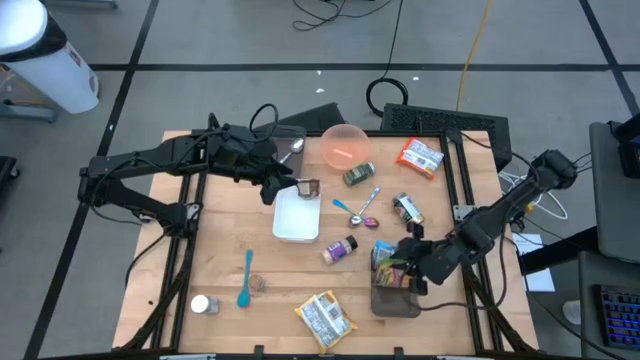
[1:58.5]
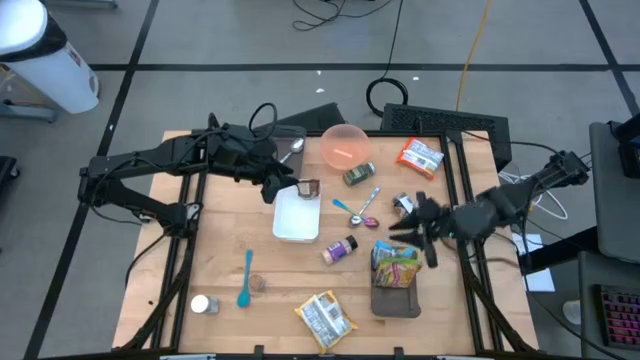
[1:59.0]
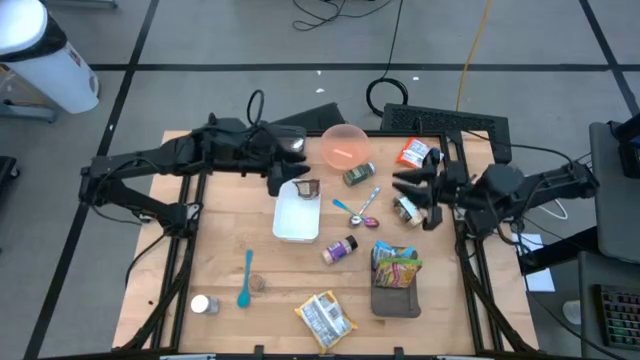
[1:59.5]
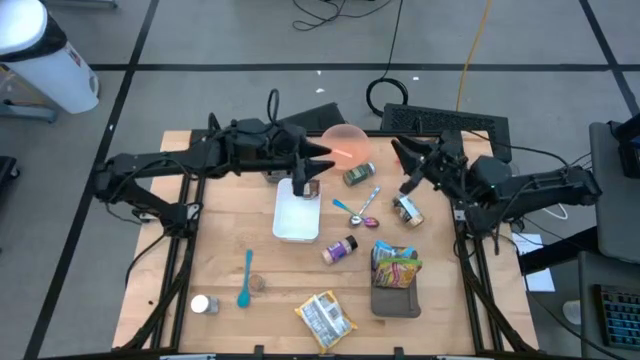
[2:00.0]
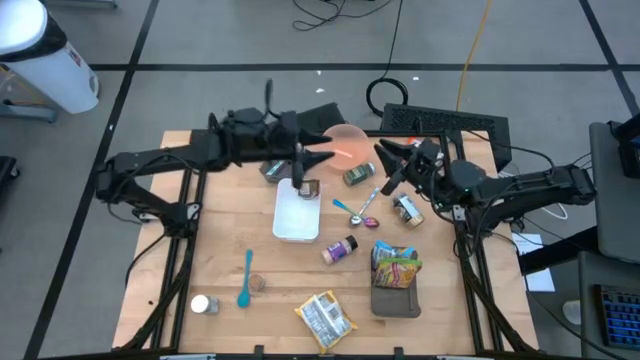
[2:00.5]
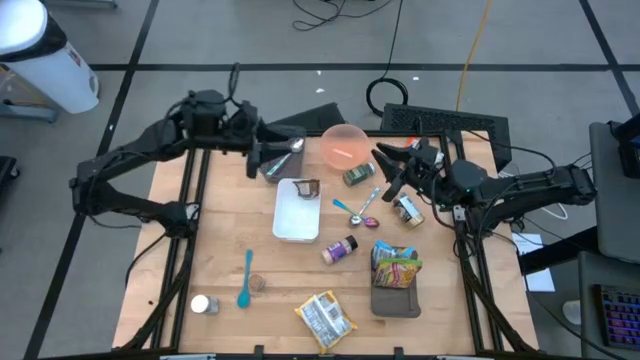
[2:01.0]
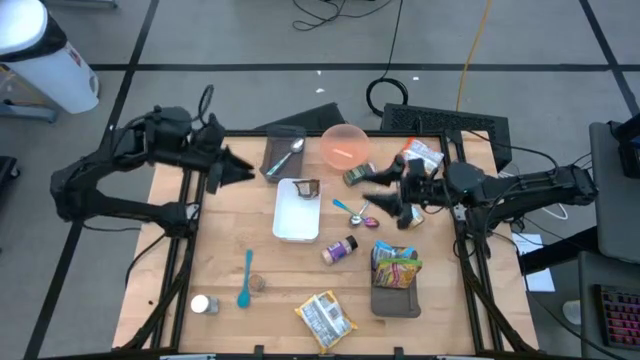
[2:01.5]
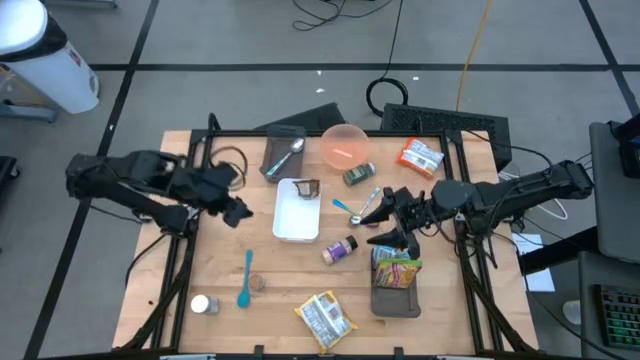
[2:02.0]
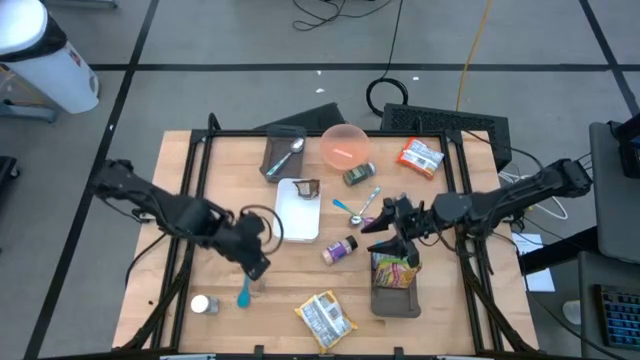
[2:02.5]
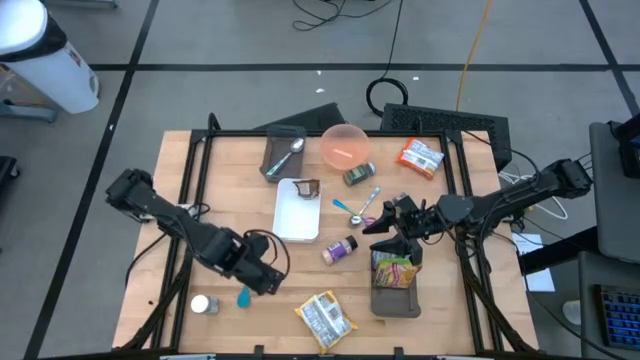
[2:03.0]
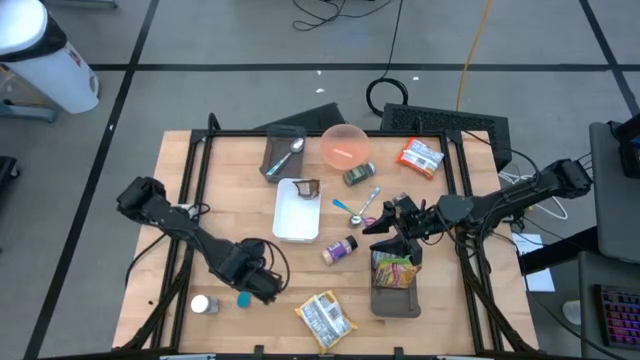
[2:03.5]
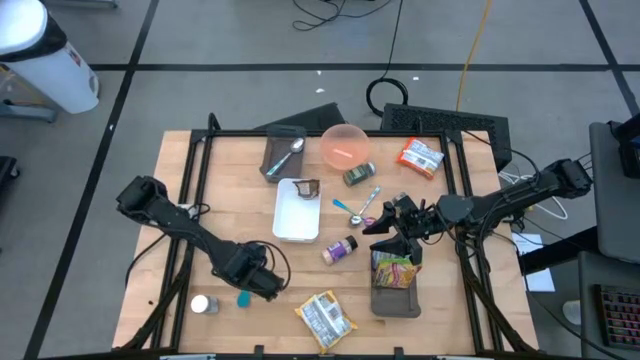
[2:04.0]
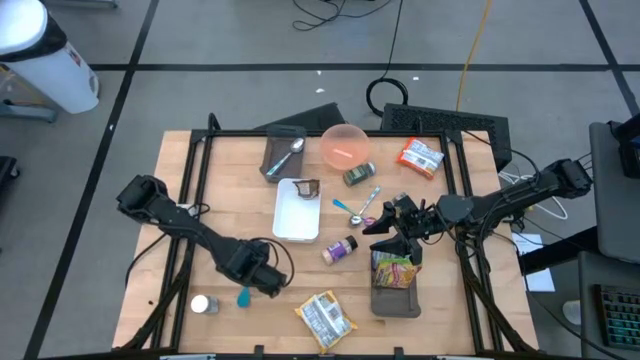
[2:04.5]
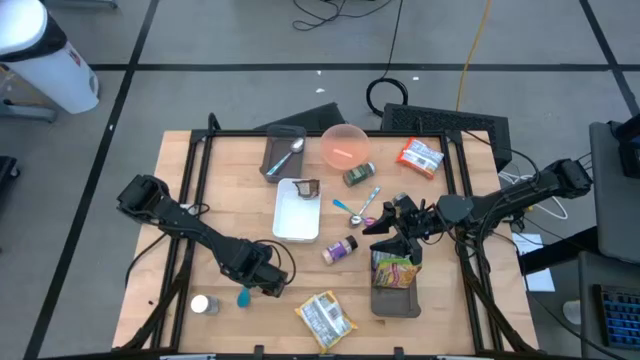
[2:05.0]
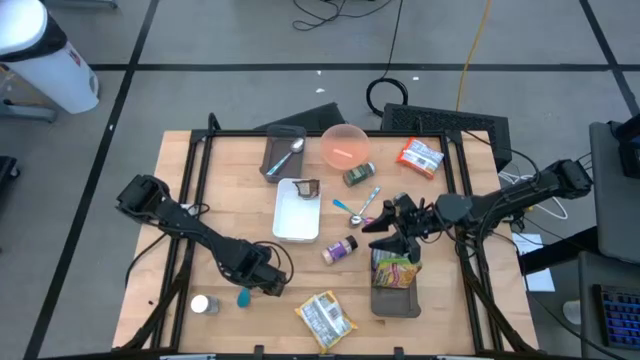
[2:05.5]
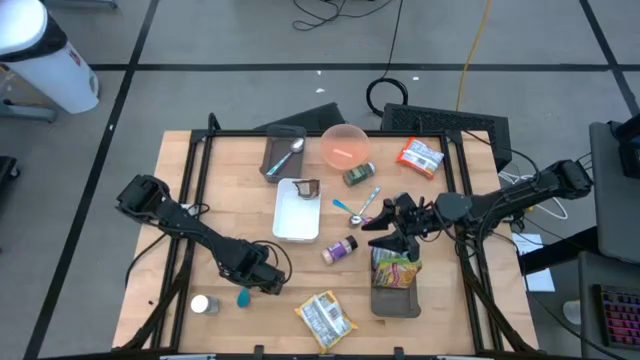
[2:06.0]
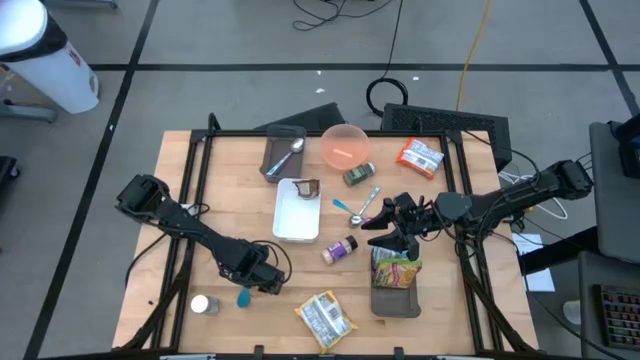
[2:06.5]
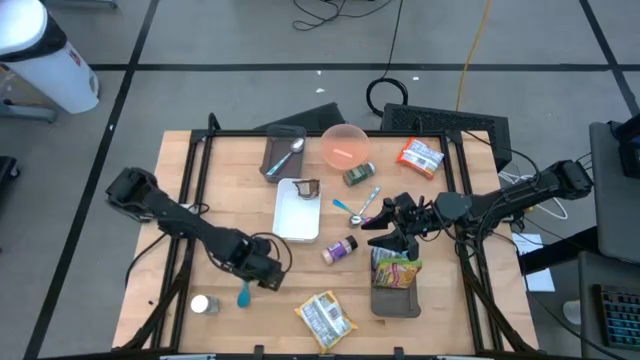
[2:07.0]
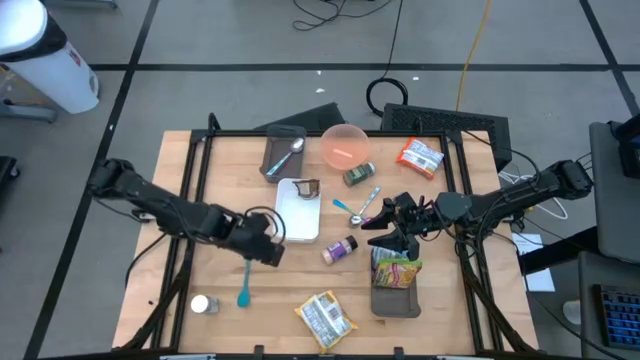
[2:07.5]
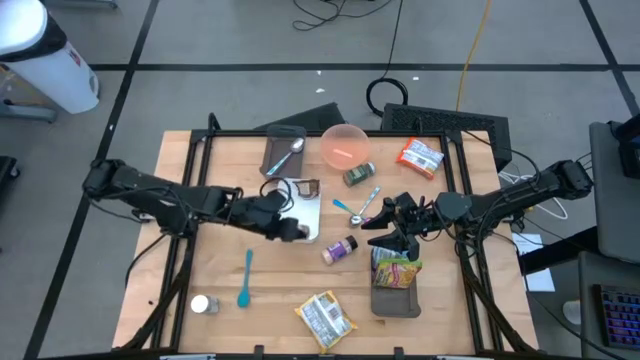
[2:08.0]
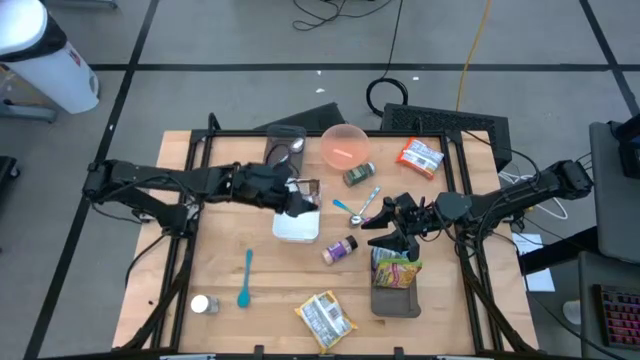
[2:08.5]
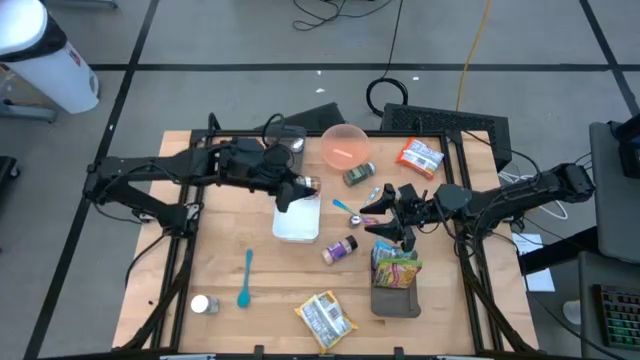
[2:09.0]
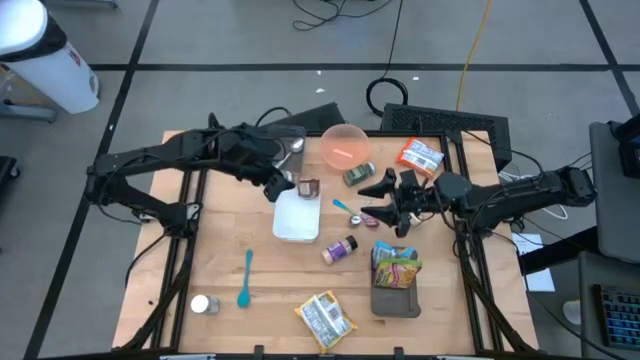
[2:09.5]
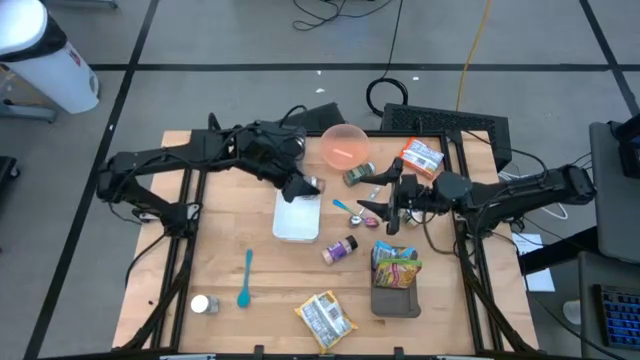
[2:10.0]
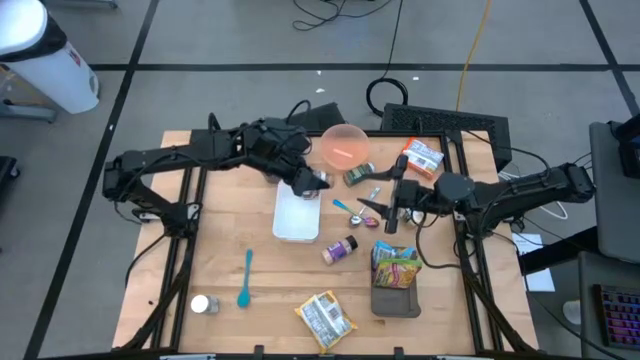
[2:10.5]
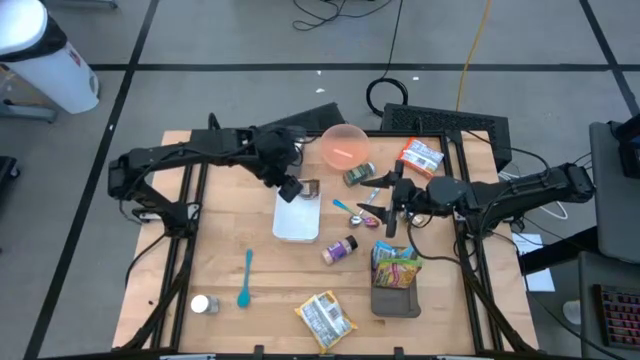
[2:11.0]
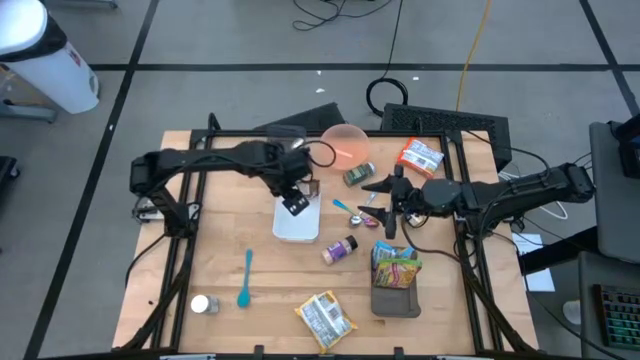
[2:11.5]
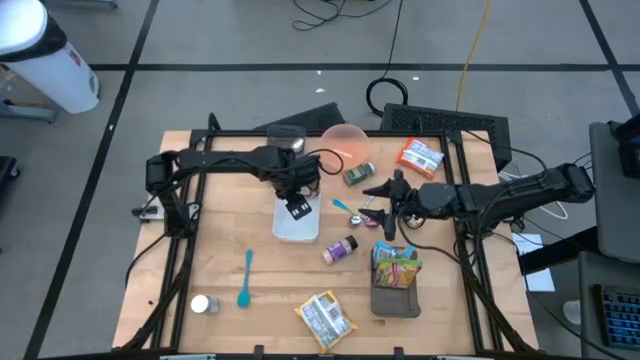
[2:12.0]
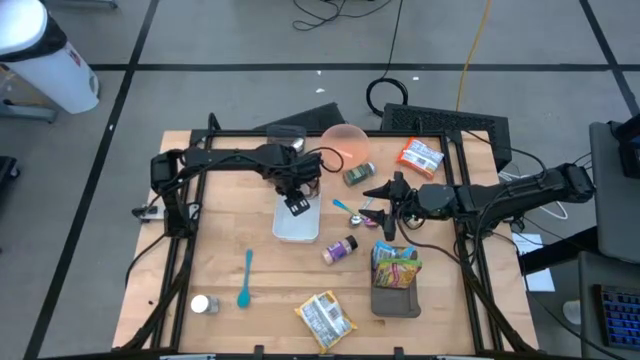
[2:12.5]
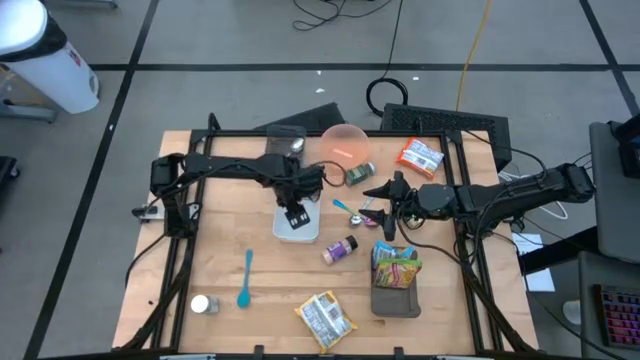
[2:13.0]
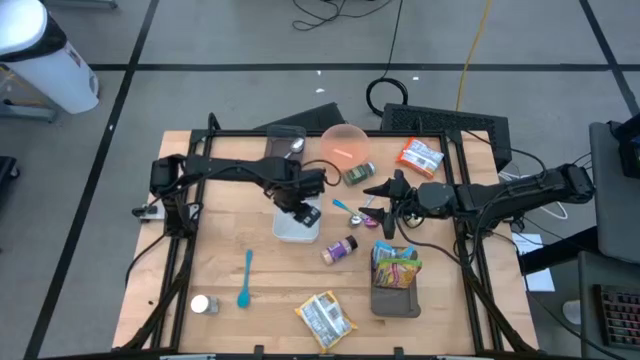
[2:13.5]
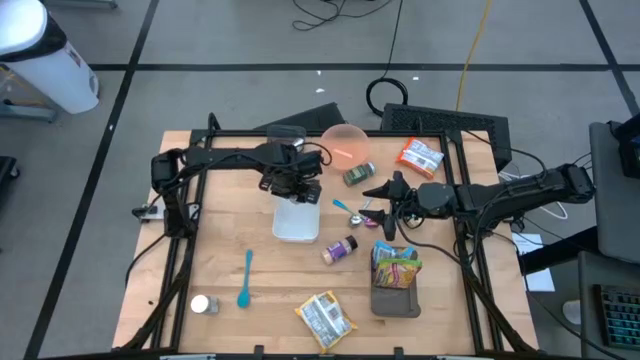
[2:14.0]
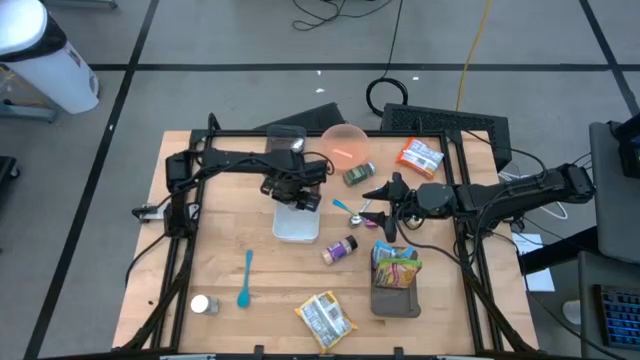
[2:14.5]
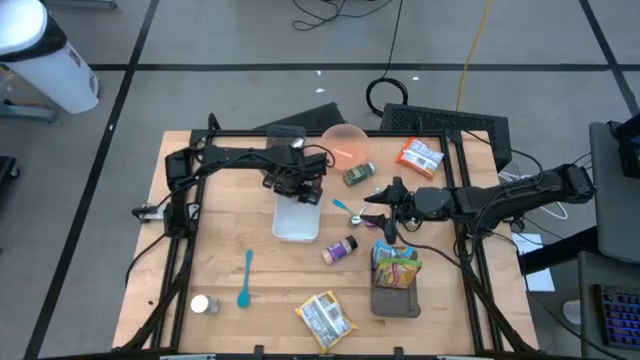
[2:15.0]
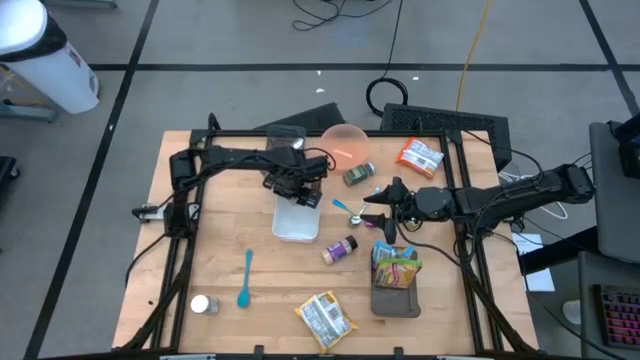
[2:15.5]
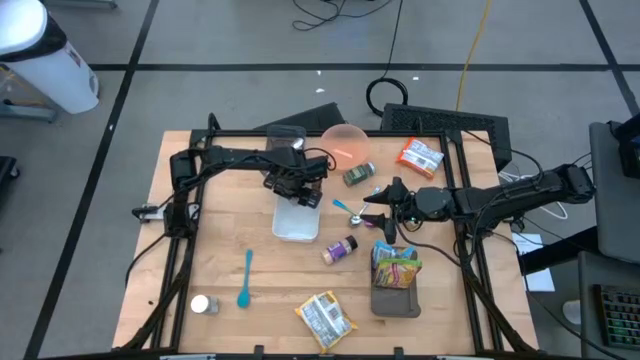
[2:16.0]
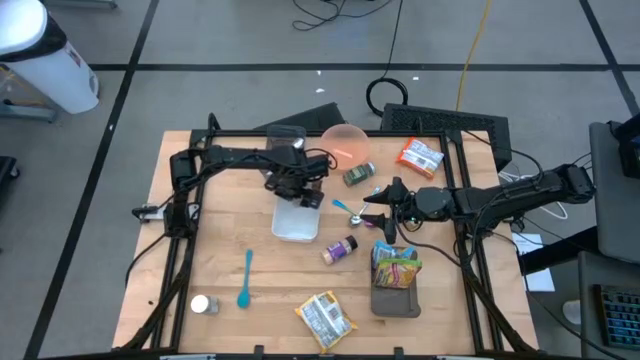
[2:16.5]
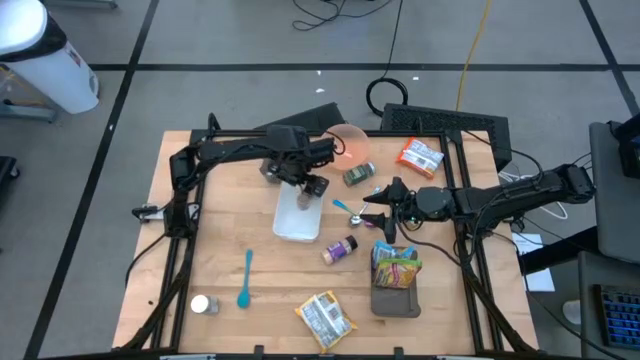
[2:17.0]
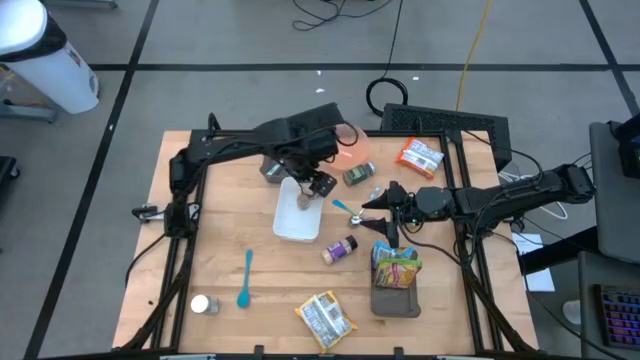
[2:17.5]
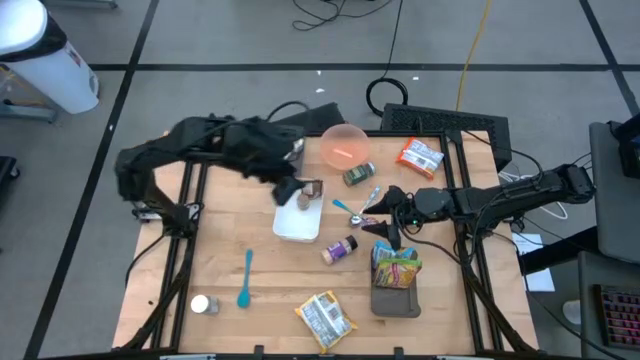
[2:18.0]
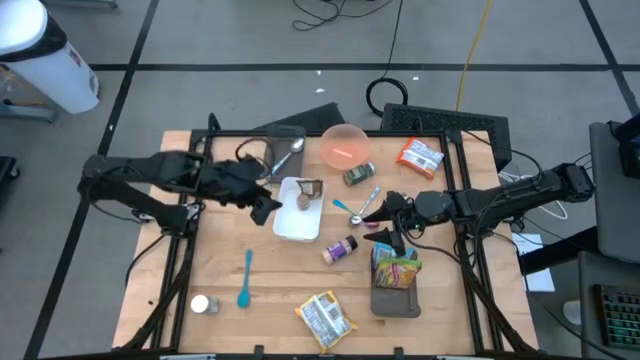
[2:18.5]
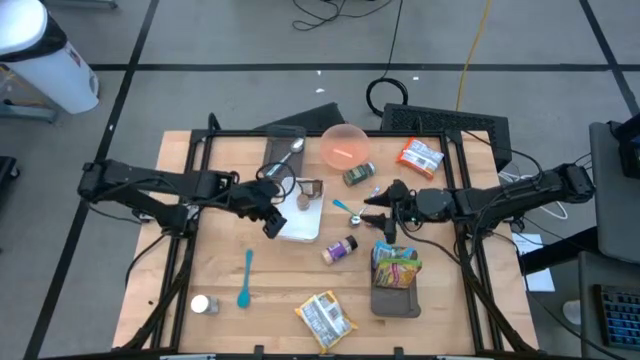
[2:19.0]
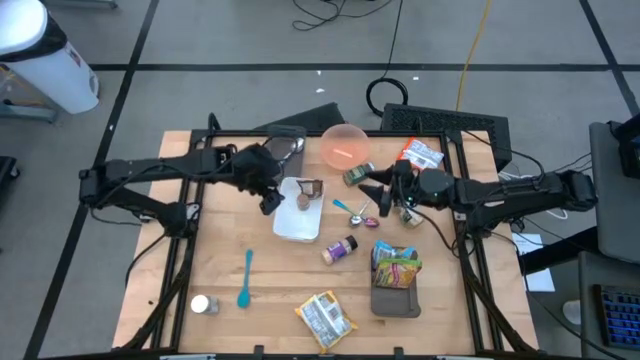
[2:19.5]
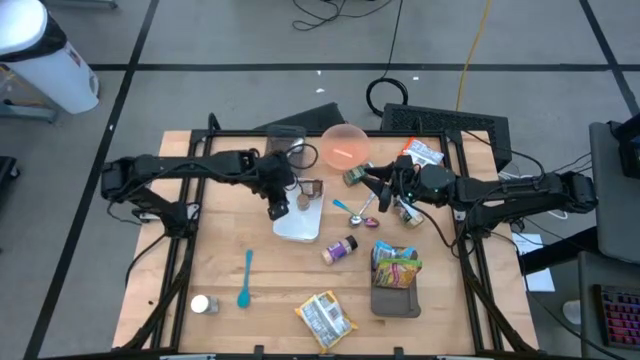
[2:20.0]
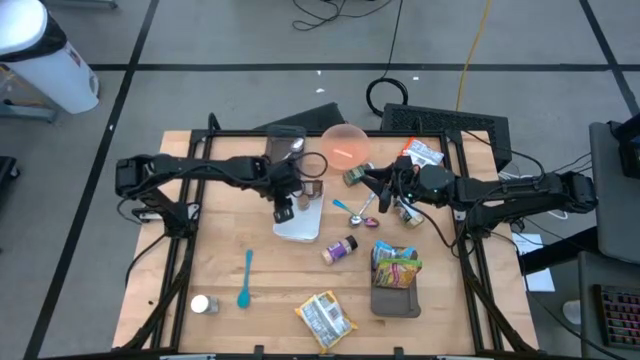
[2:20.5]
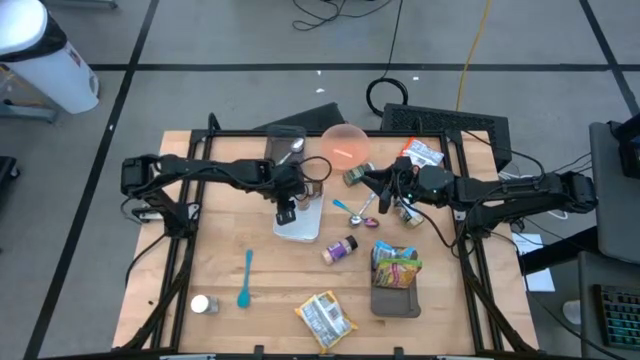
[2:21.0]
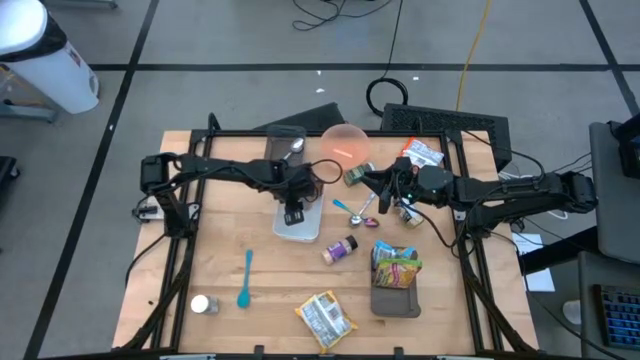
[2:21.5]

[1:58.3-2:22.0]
Task: Pick & Place Food Item
Put the brown seasoning bottle into the white bin
